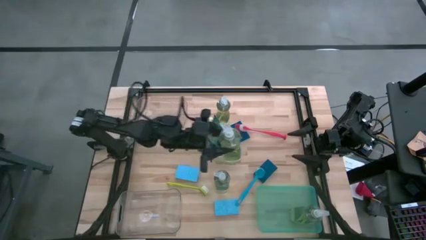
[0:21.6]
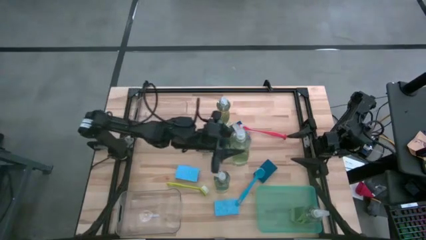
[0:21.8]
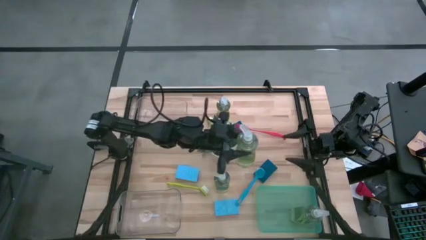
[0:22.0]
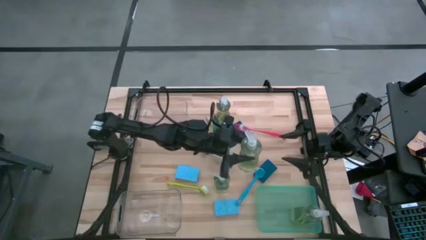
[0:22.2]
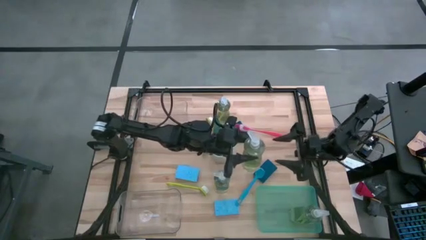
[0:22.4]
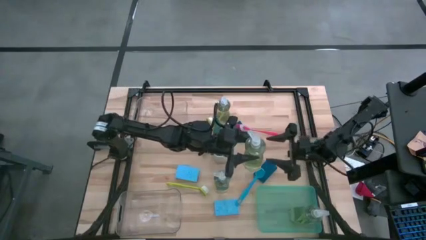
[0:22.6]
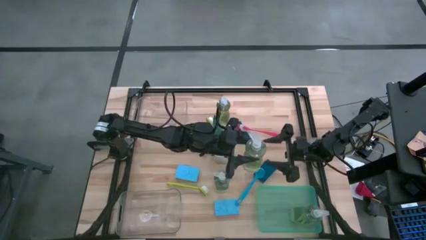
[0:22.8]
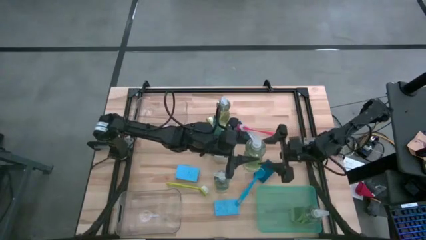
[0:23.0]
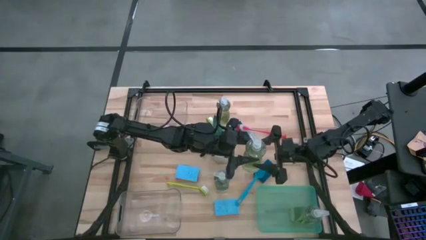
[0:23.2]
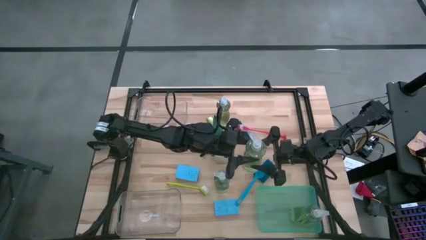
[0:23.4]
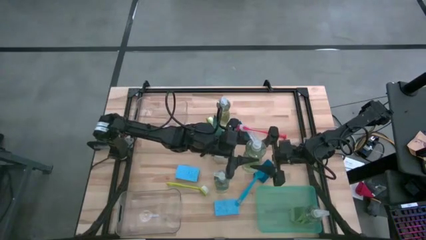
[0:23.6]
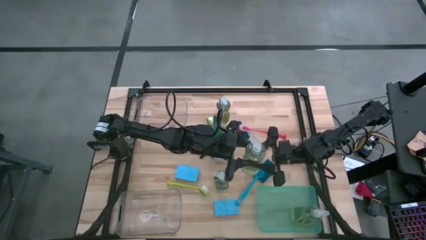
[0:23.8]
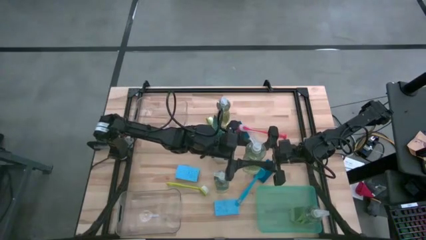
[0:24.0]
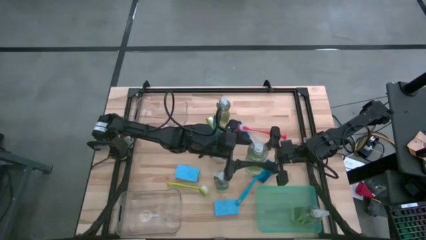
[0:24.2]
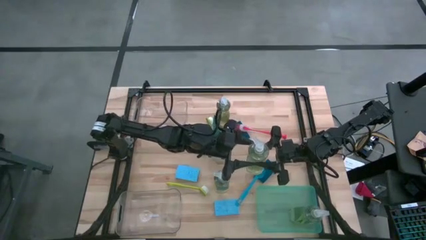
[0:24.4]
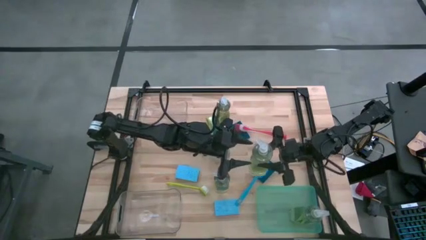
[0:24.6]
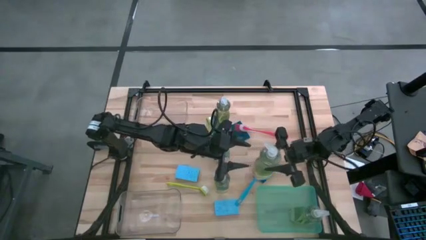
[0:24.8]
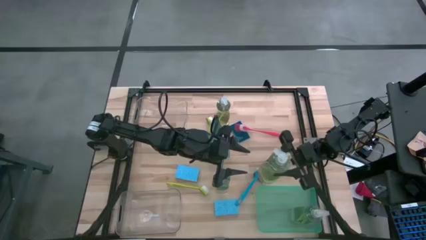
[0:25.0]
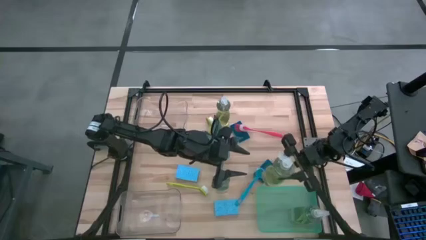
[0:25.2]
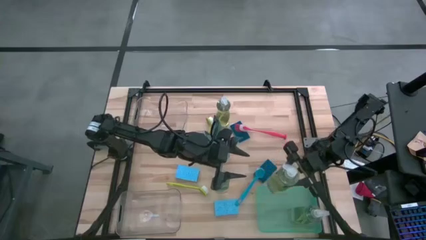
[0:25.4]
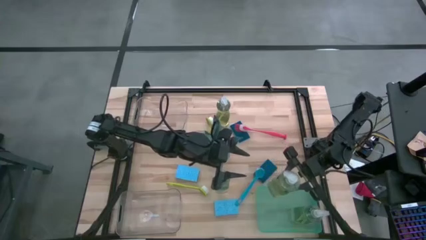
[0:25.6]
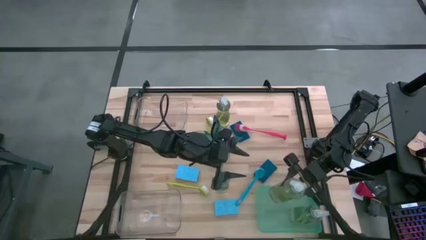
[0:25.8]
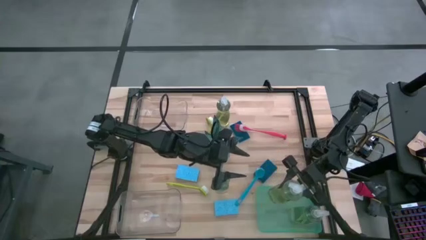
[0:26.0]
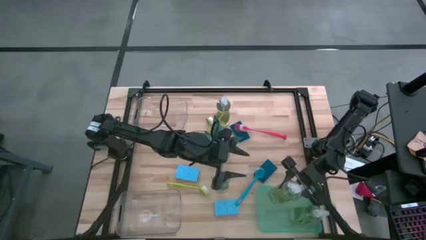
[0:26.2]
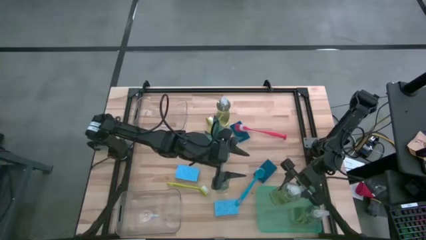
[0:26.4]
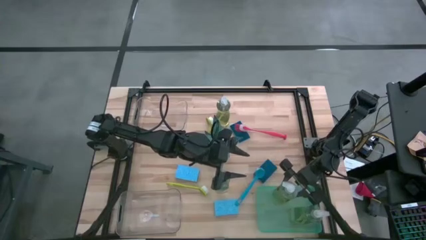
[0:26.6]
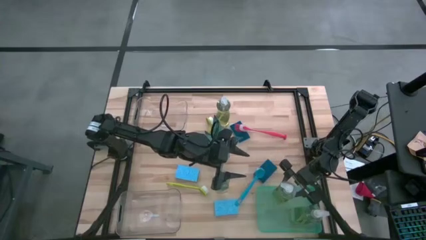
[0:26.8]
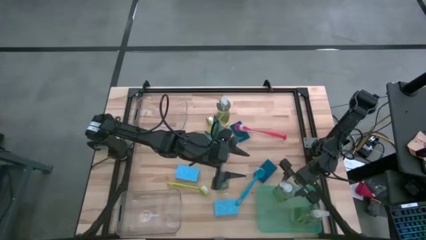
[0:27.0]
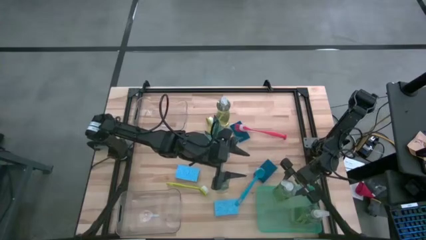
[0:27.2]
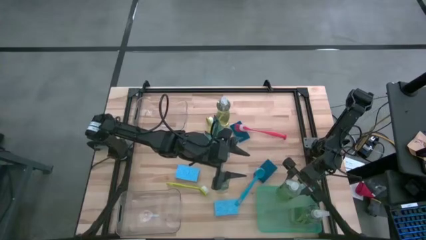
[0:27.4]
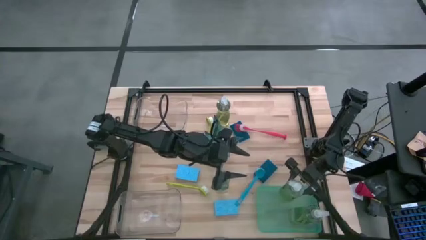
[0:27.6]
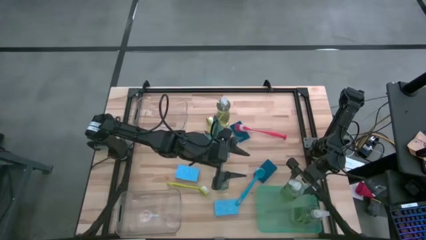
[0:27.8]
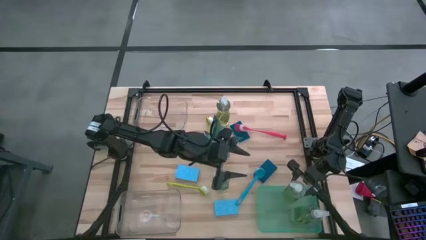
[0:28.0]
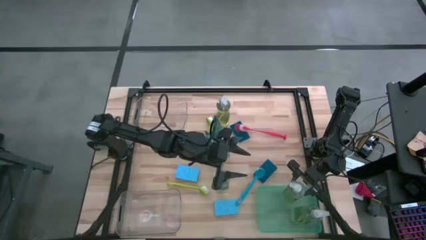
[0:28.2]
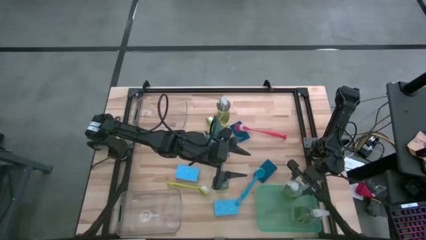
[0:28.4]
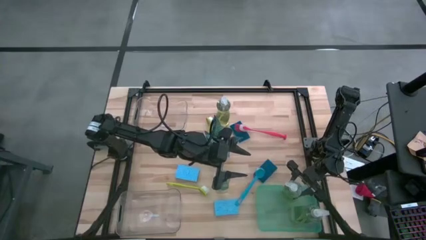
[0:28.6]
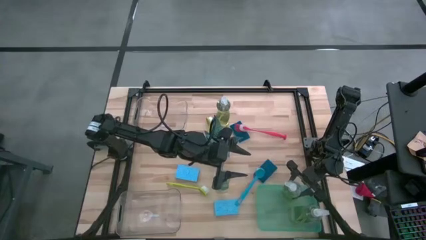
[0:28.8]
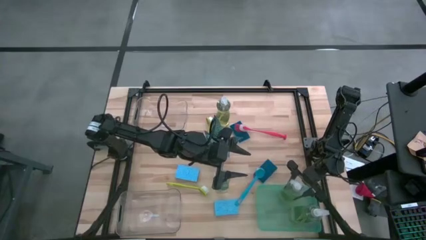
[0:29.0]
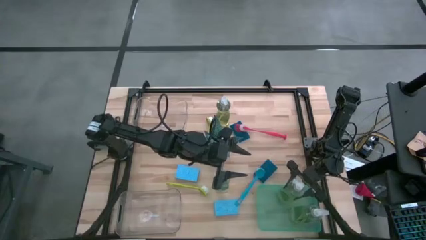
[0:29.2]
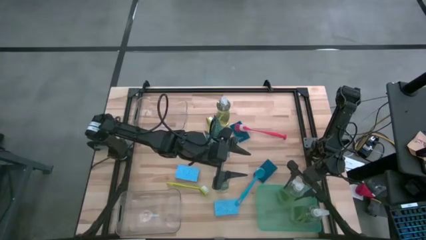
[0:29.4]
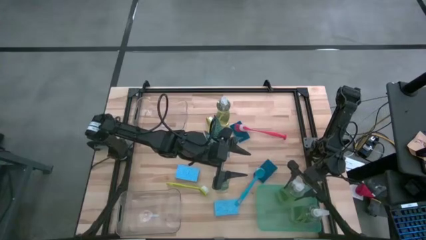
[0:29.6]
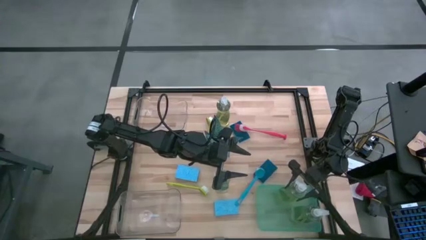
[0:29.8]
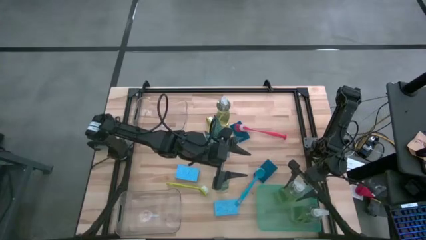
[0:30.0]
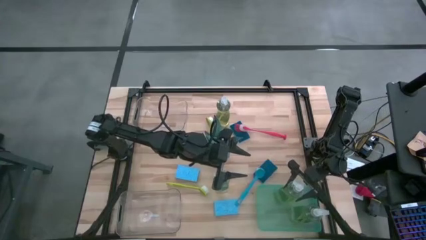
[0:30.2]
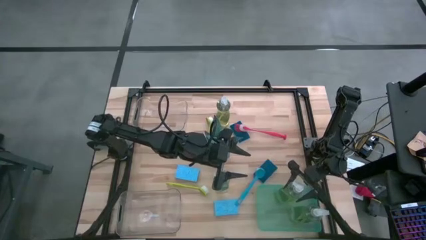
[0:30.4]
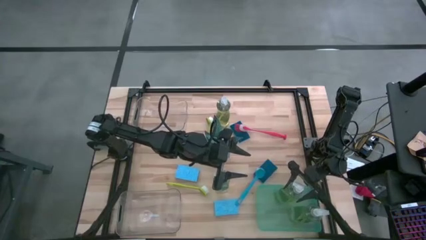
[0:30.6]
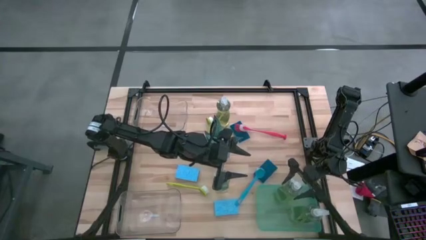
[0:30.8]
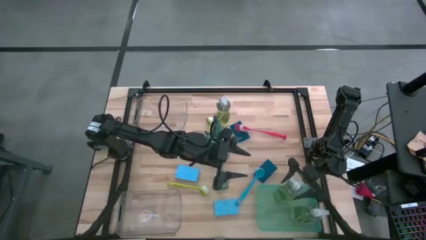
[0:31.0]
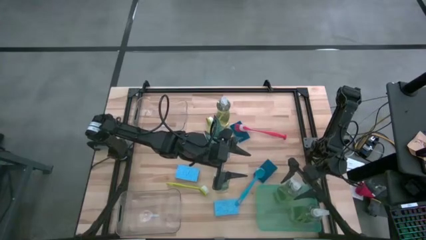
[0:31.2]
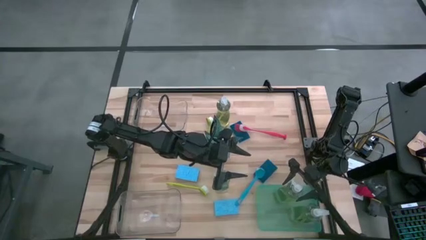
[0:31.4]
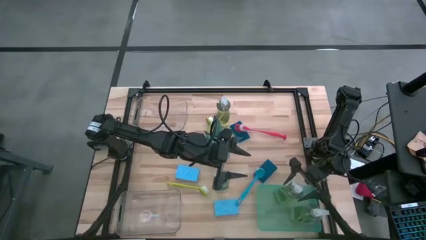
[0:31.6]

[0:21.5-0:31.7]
Task: Pick & Place Kitchen Sink Supplies
Put the yellow dish soap into the green bin

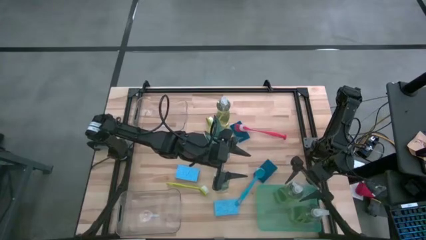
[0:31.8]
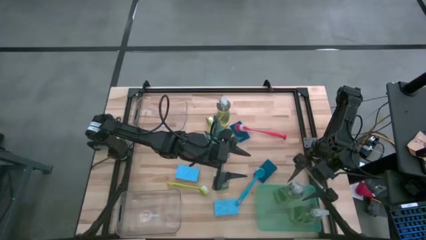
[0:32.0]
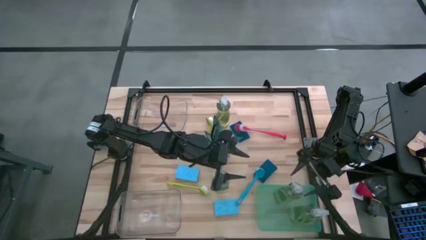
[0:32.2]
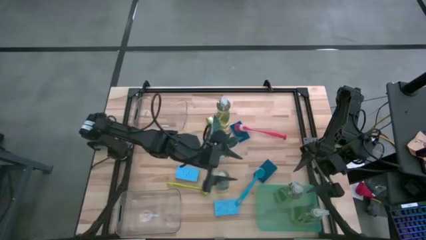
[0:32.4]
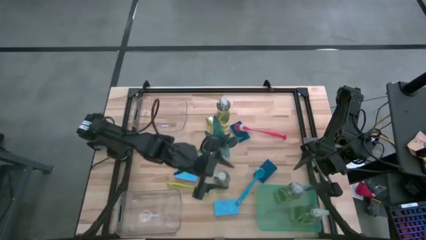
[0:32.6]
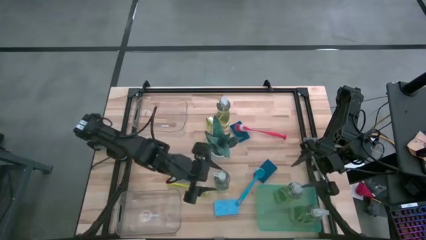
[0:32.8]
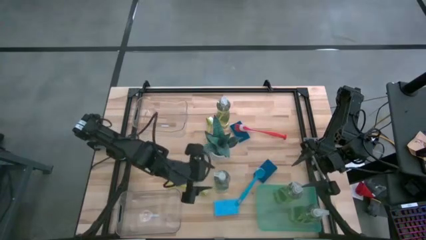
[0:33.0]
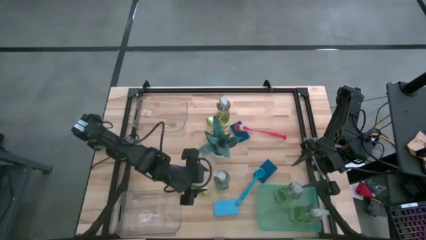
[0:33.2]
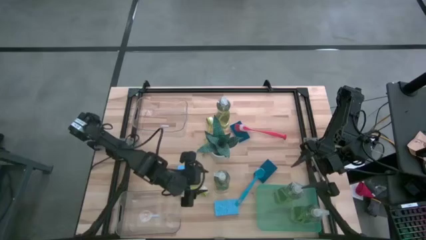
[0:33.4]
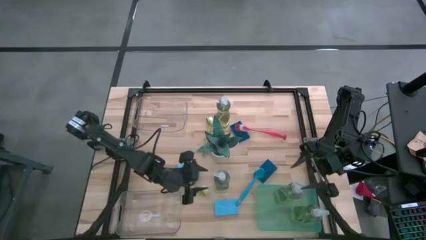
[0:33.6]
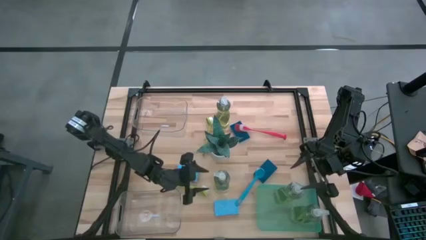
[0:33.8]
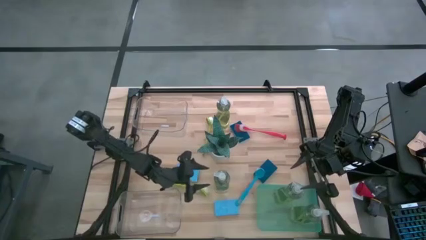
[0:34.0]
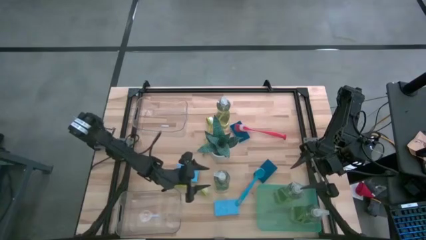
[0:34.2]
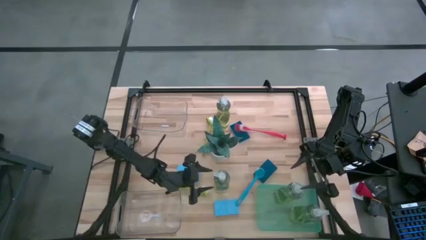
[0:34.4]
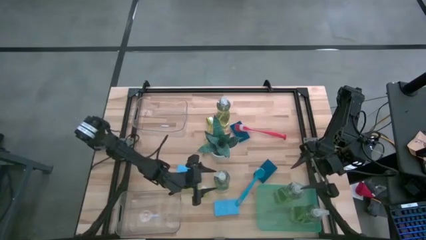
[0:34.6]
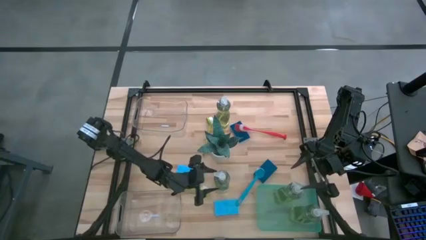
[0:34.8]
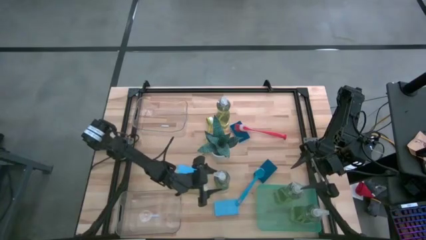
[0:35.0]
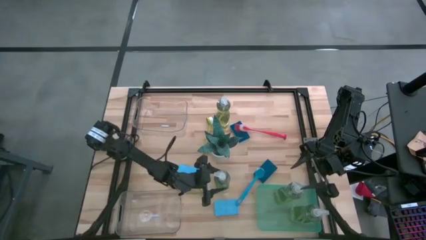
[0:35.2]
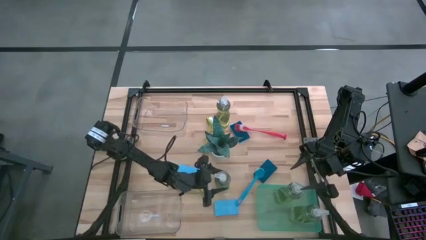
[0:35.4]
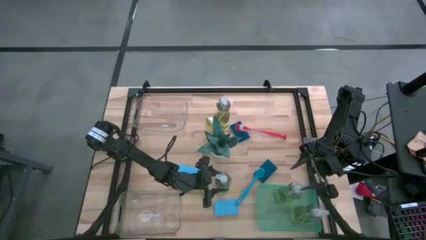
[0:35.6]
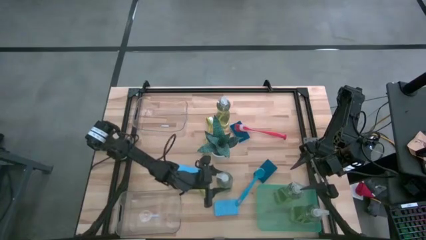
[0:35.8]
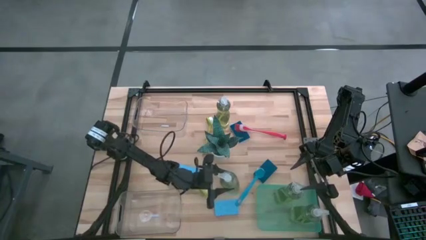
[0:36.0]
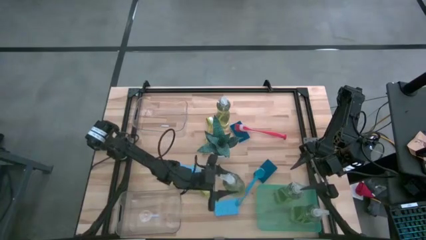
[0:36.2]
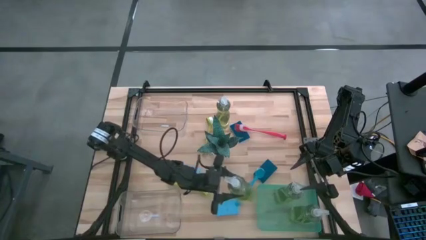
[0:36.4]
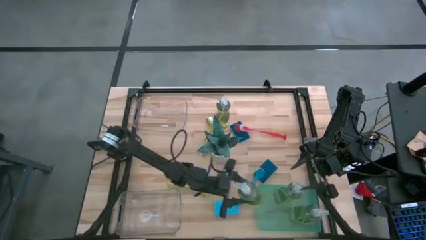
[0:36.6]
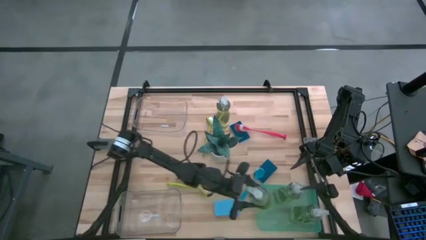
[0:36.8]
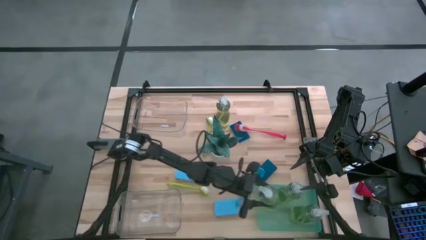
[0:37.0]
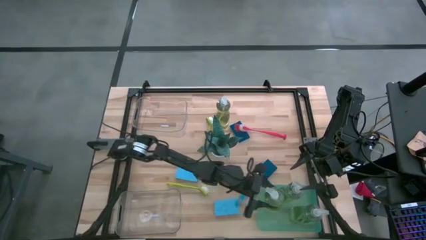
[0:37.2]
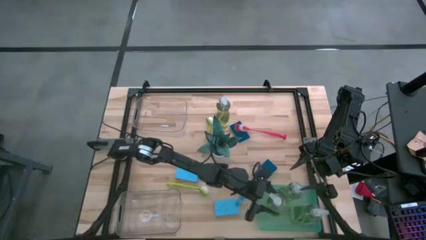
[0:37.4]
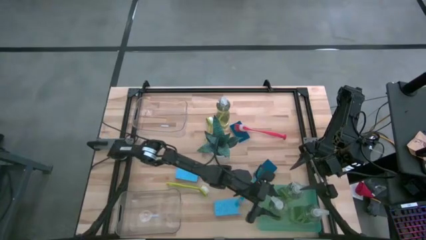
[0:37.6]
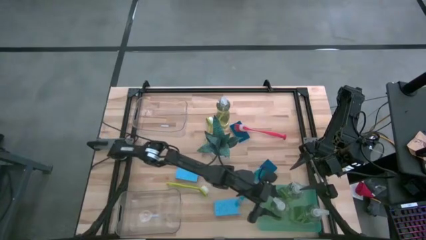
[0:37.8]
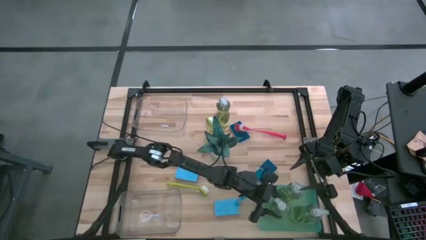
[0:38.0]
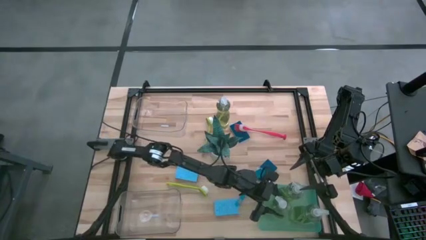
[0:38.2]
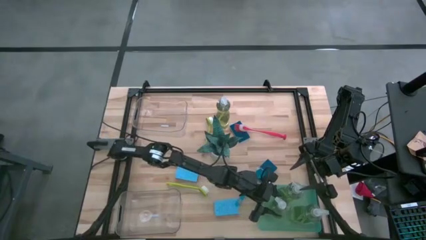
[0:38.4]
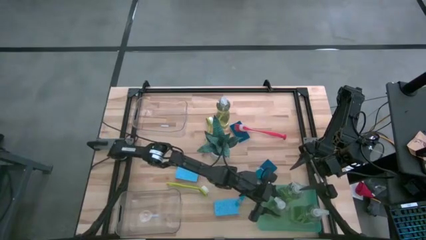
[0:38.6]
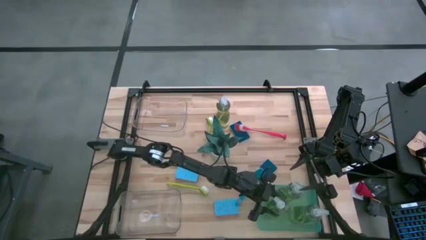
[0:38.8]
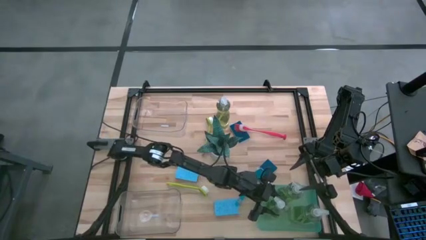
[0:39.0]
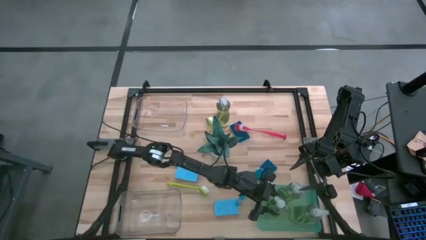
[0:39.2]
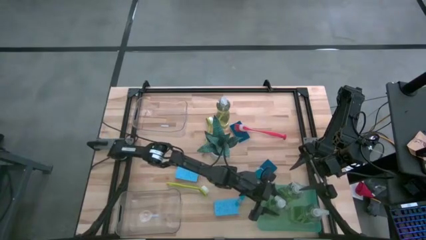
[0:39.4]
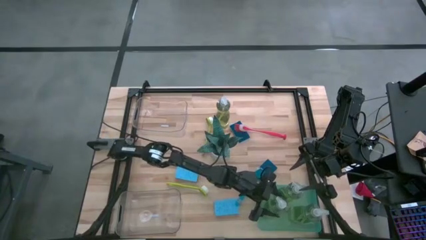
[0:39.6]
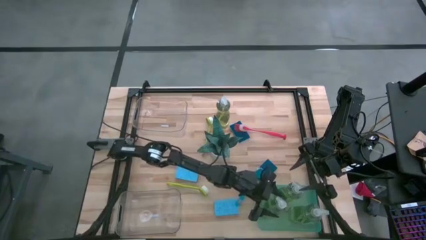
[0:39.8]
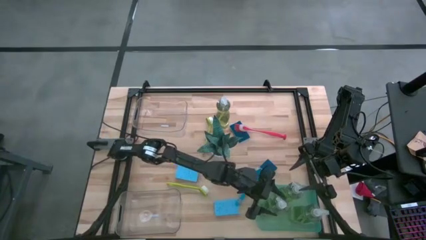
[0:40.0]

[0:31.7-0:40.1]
Put the yellow dish soap into the green bin
